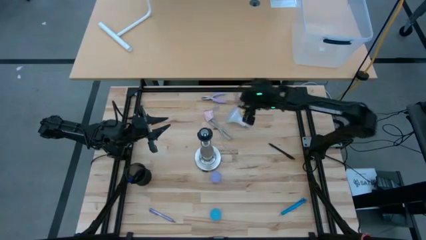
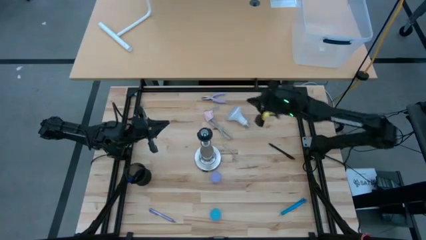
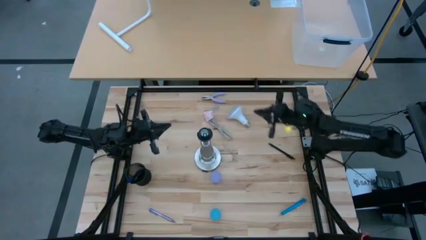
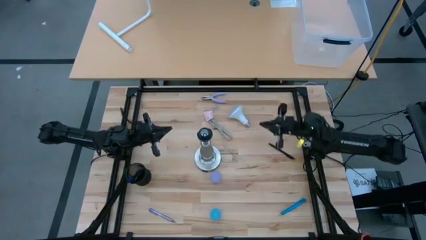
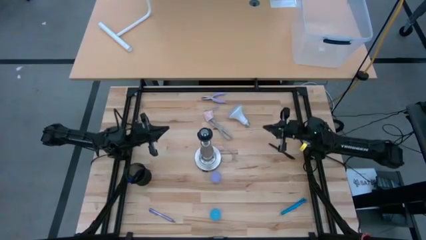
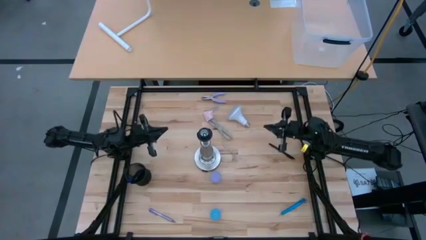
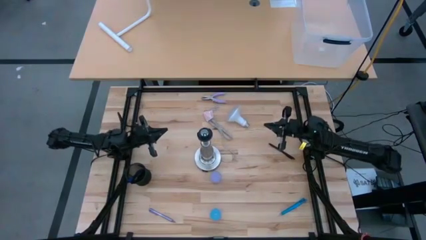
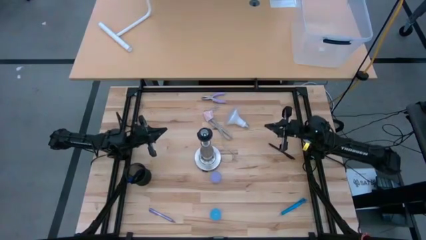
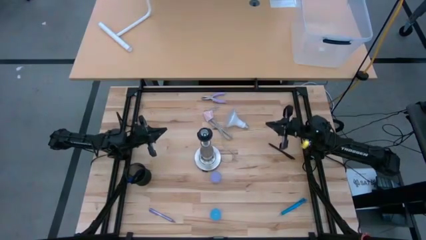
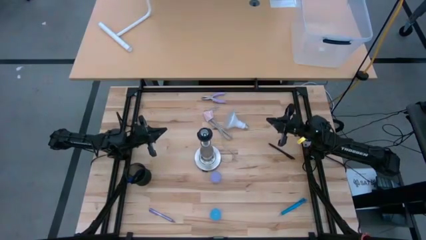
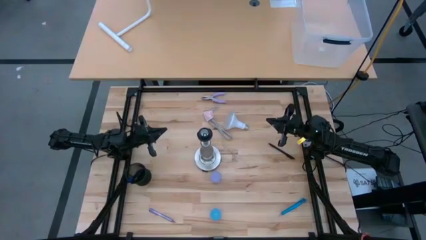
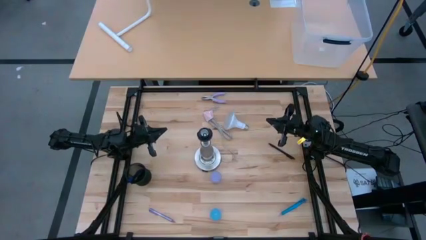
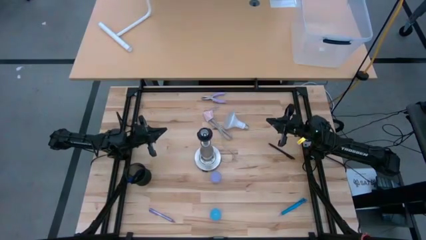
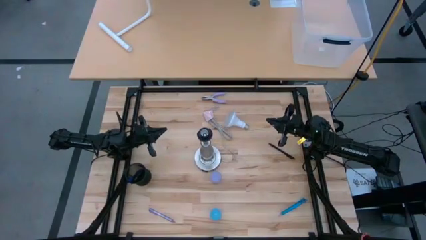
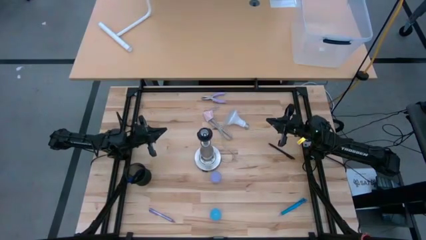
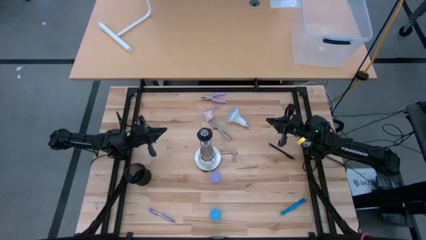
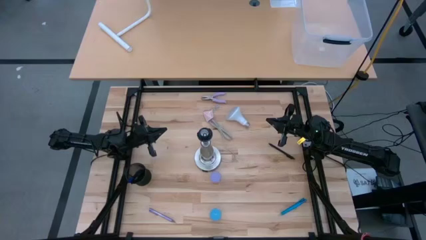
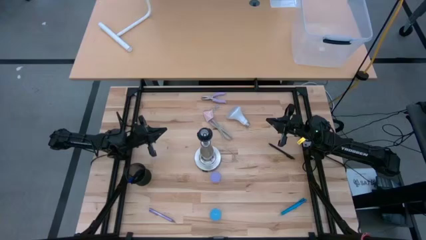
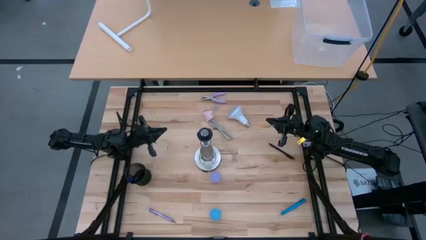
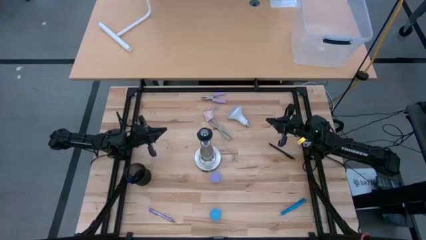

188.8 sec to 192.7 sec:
Task: Screw lightbulb
Return to Home Position

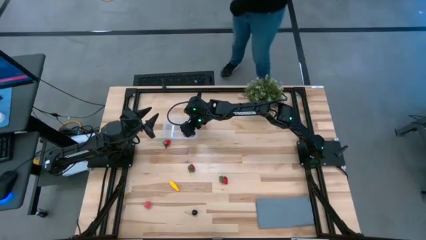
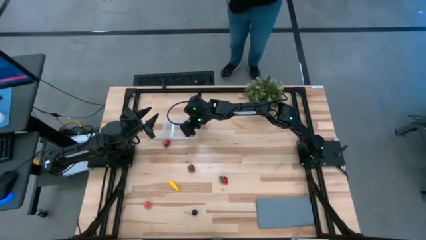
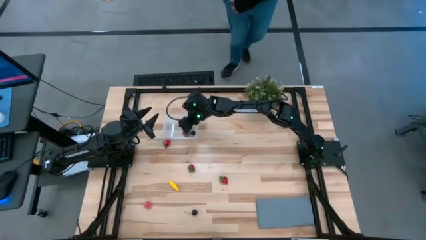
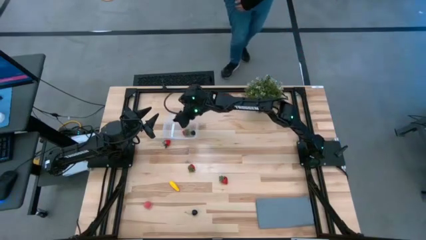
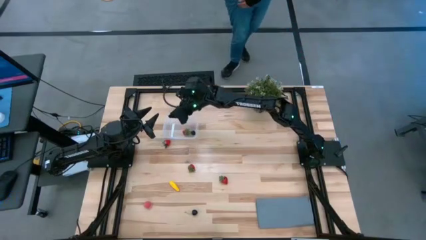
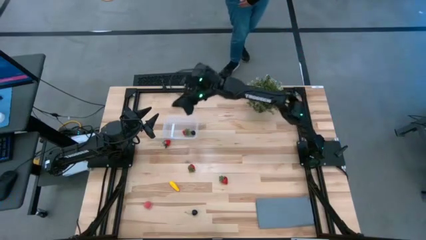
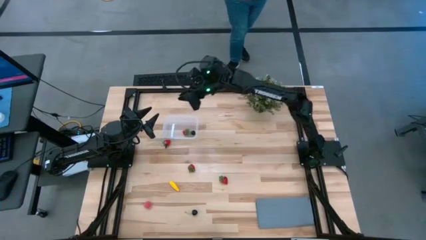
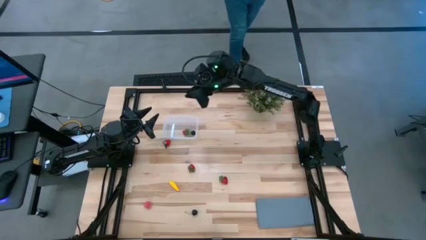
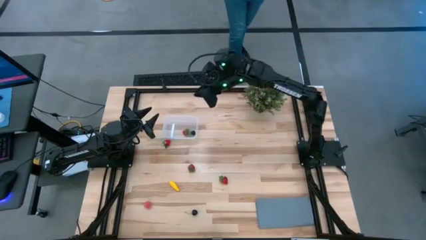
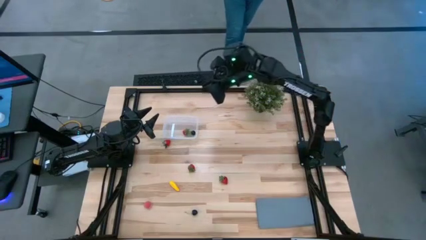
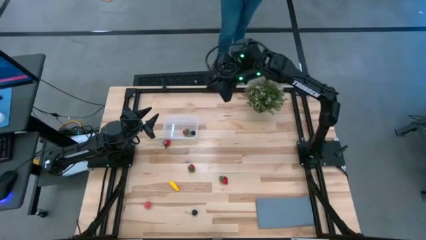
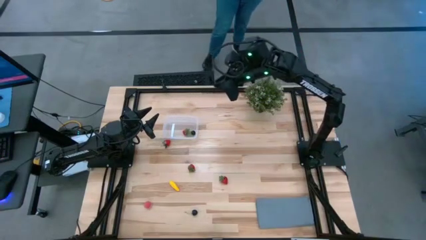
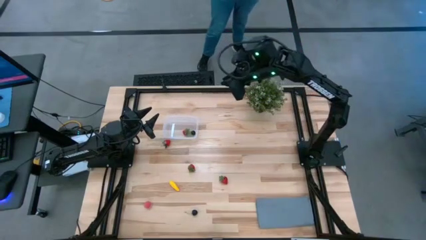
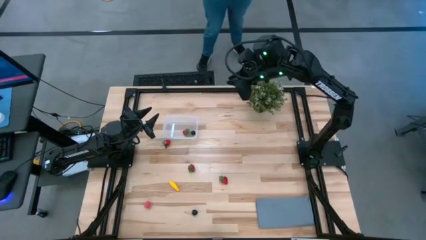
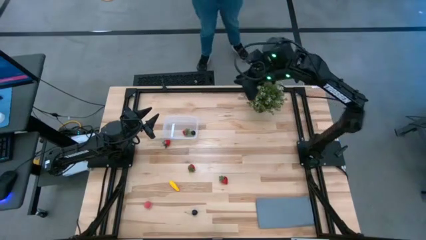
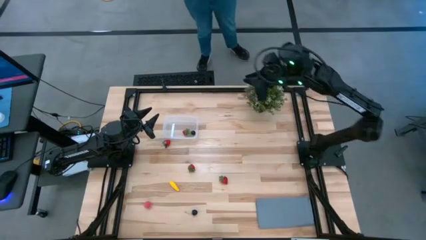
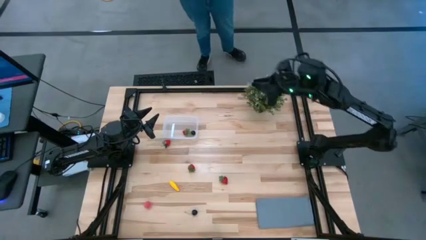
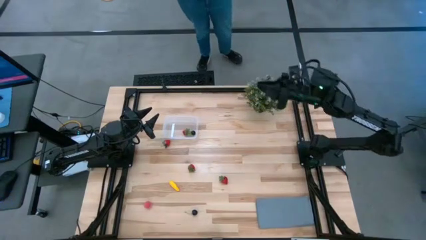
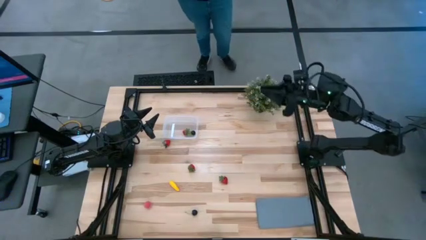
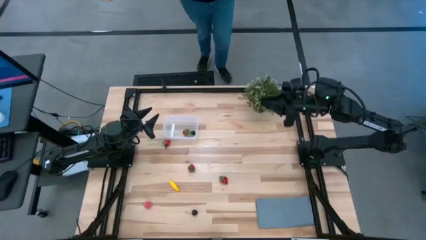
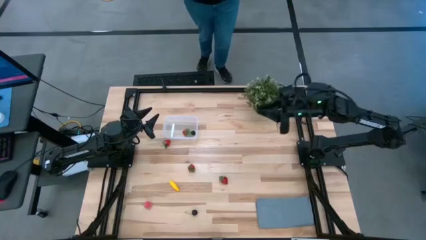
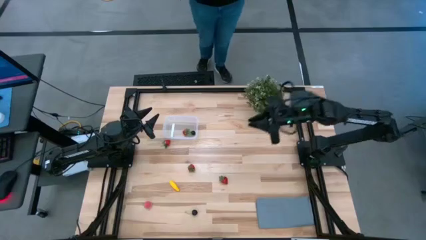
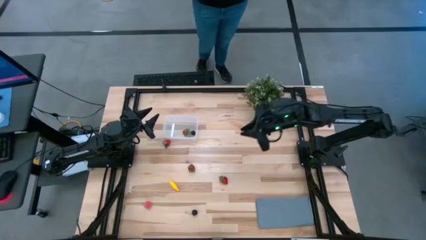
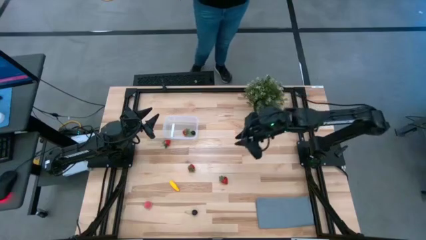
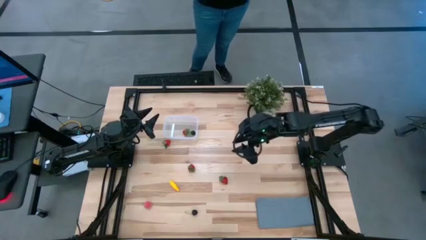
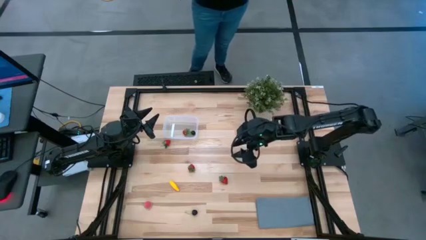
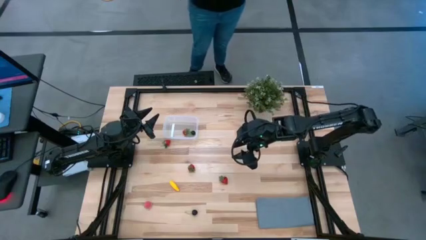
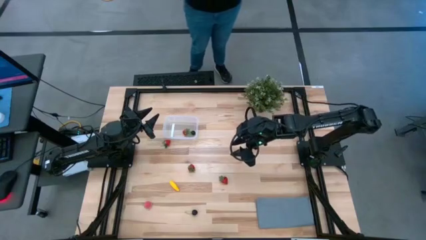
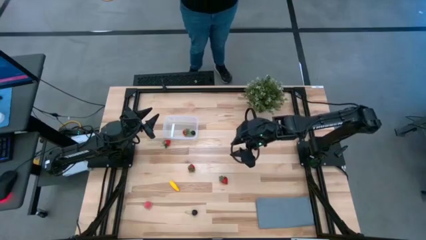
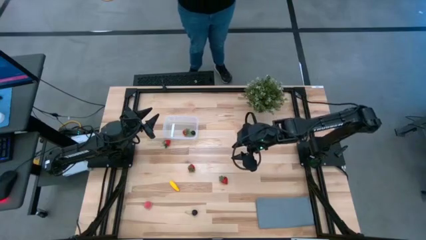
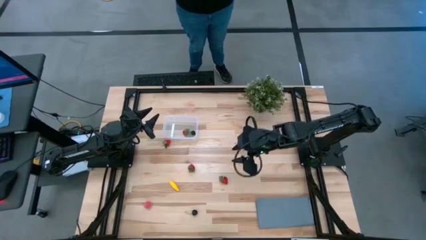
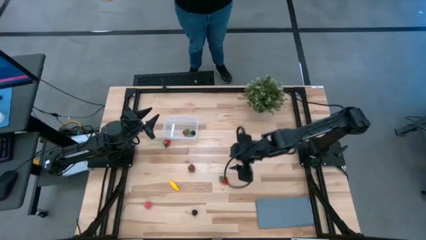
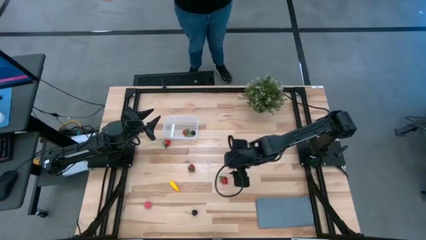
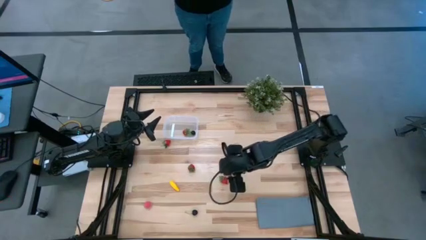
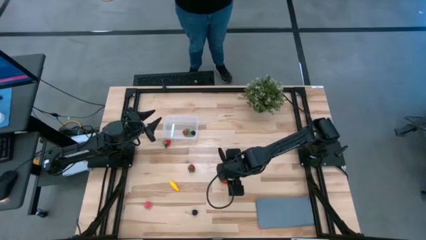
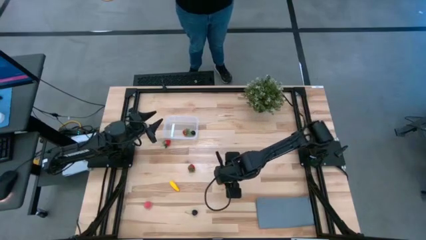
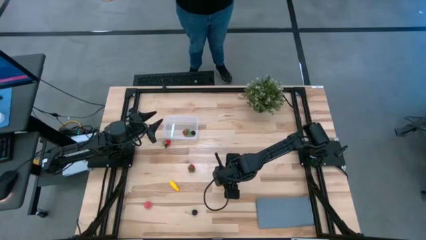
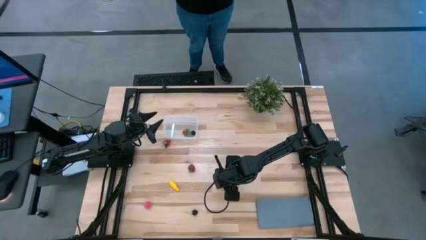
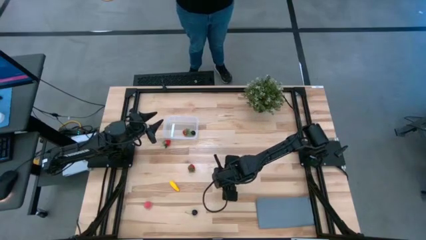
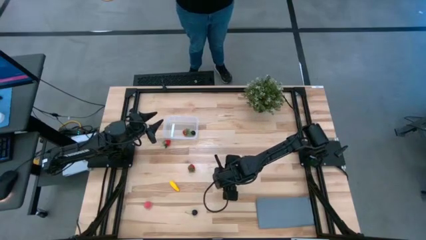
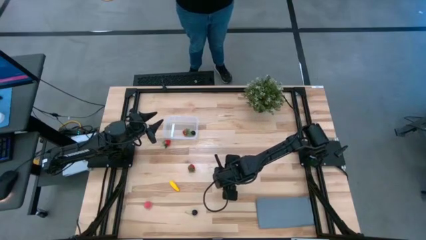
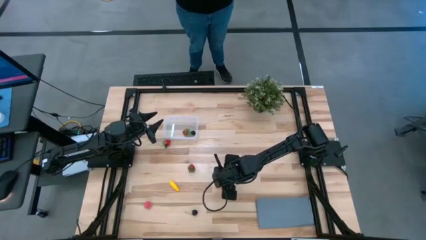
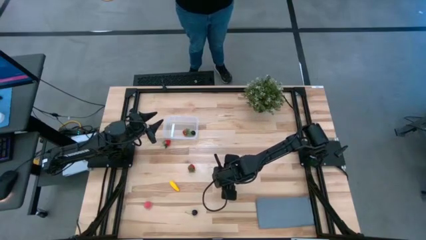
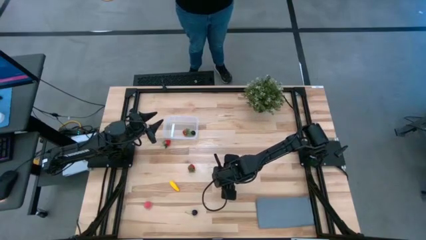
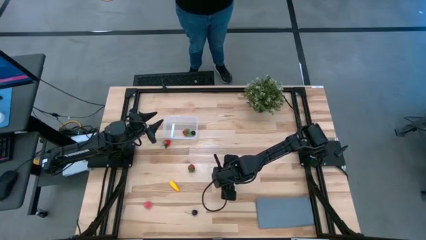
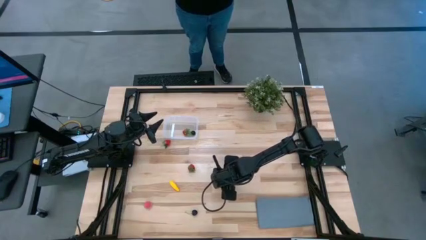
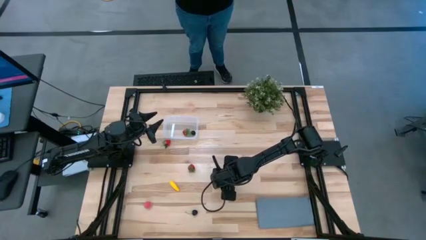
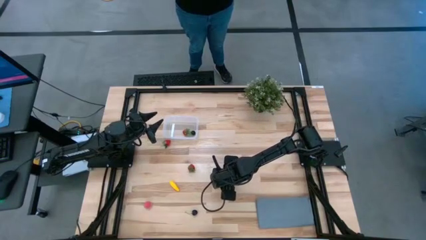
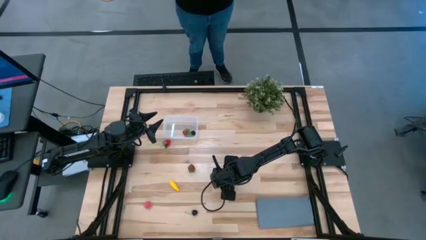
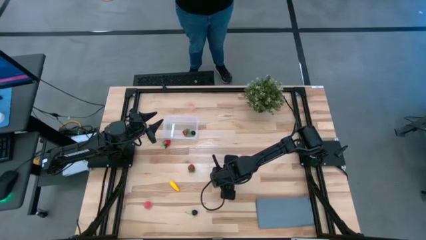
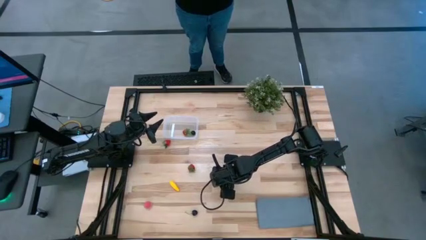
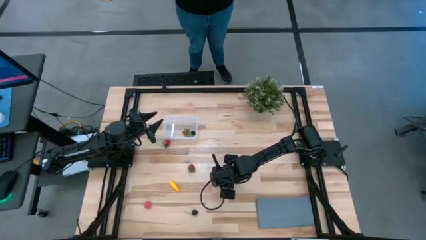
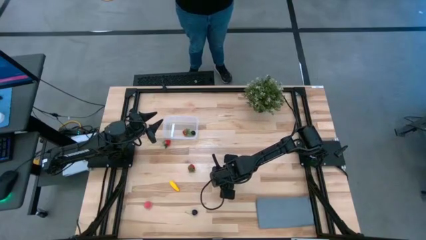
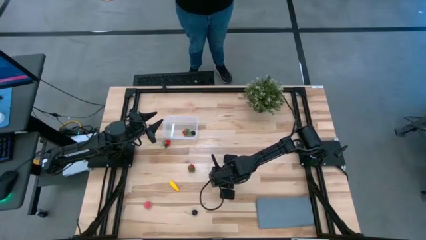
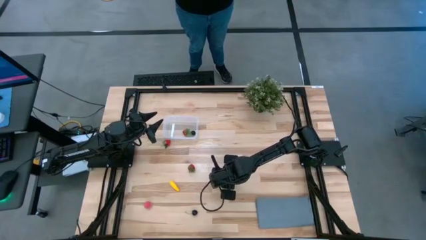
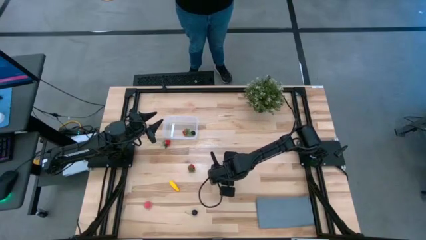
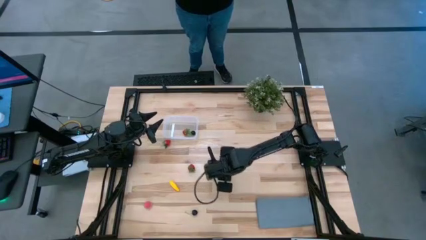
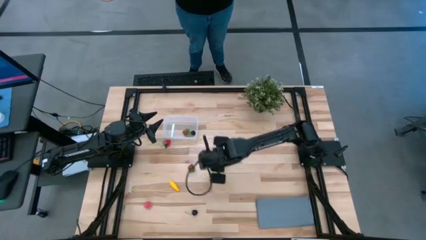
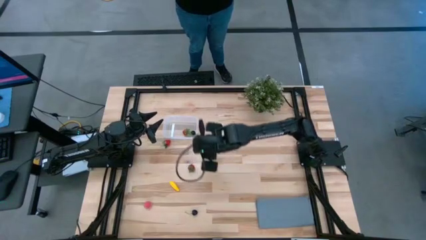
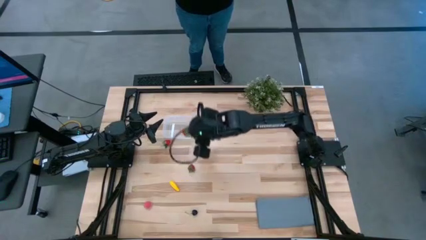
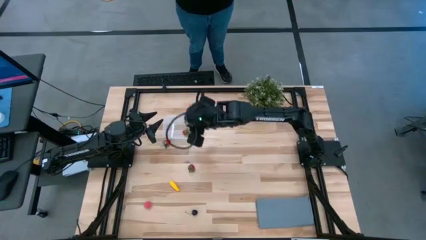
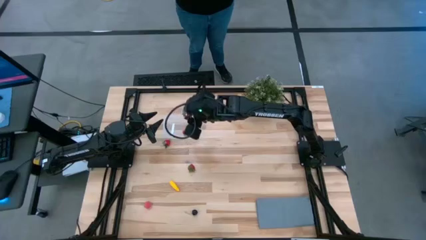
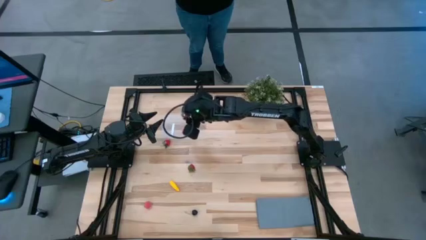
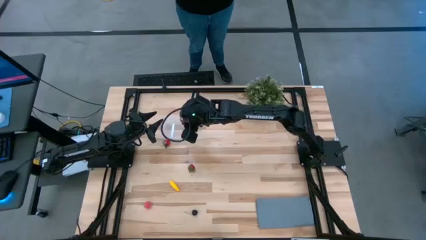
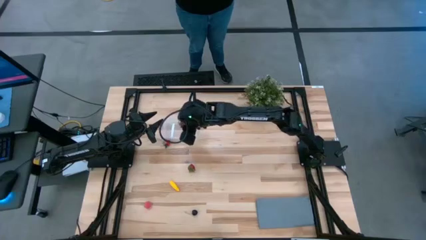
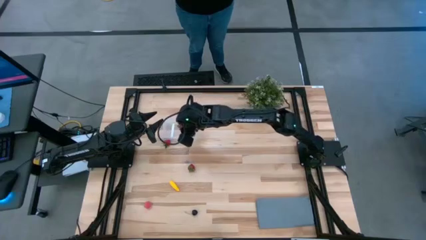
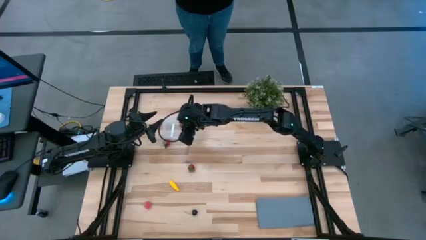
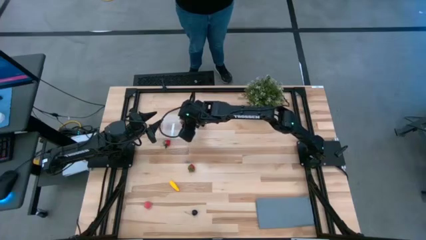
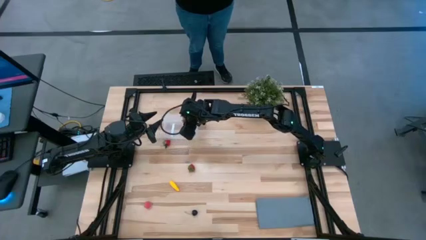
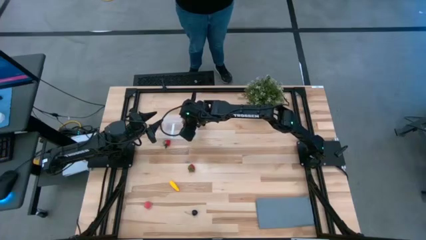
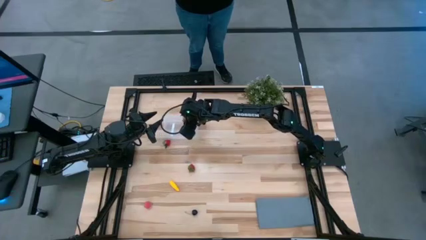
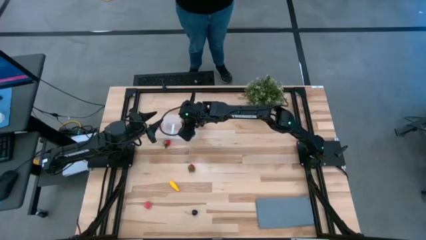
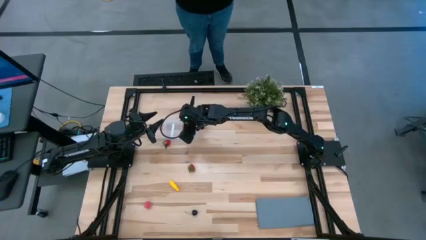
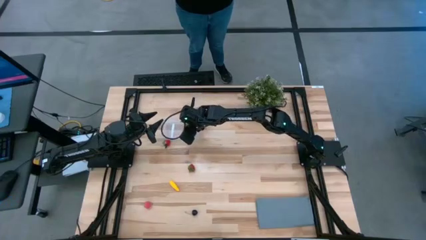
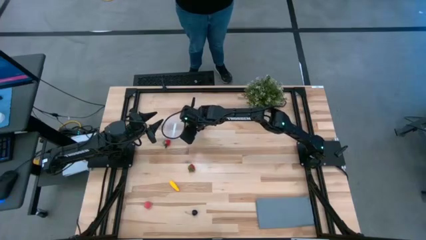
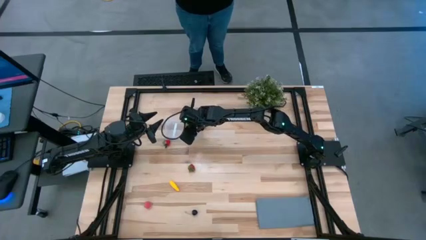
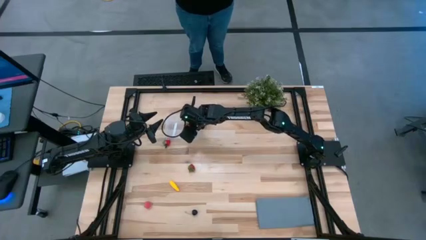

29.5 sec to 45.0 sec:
Task: Pick and placing Produce into tupperware
Put the bottom strawberry into the transparent bin
